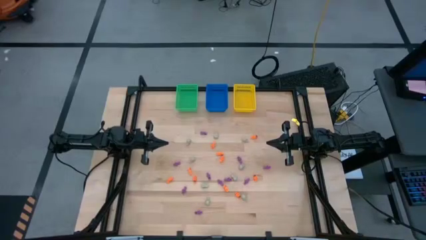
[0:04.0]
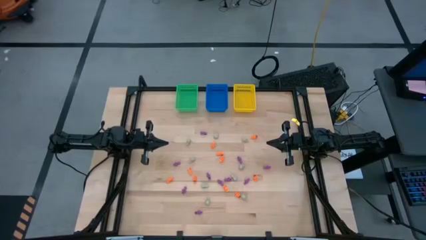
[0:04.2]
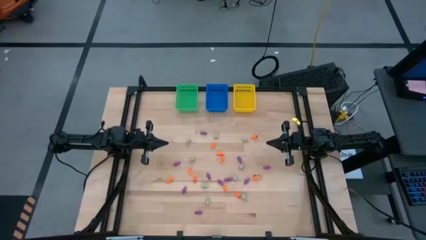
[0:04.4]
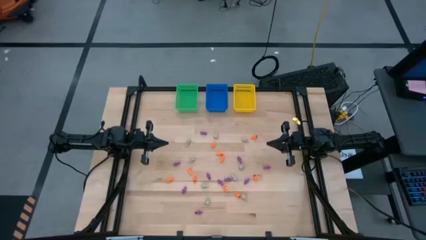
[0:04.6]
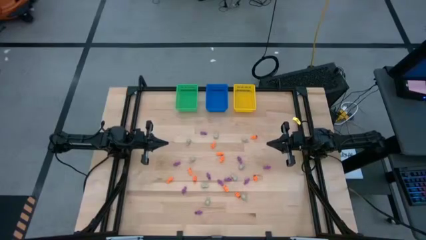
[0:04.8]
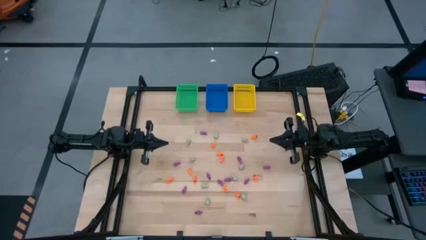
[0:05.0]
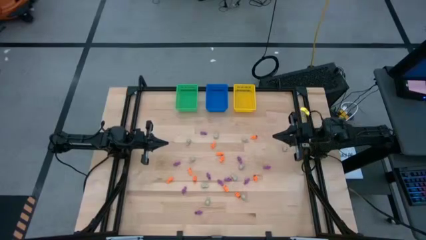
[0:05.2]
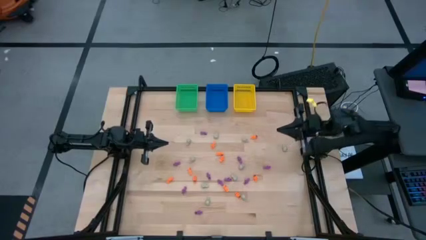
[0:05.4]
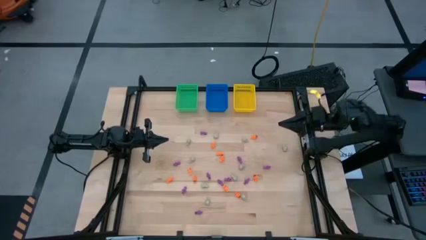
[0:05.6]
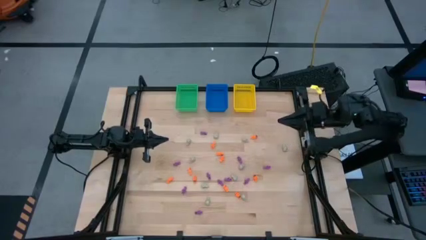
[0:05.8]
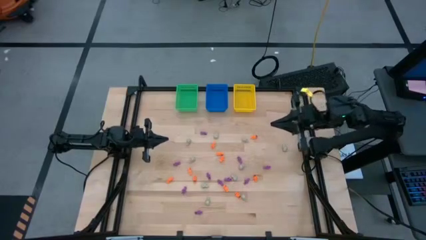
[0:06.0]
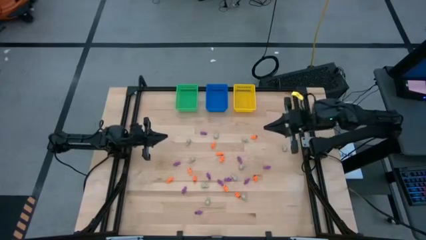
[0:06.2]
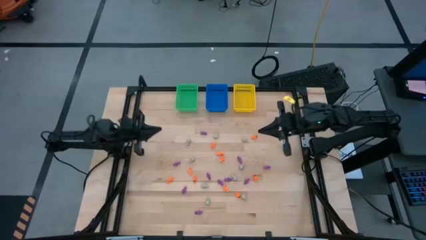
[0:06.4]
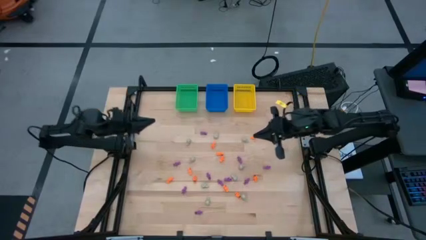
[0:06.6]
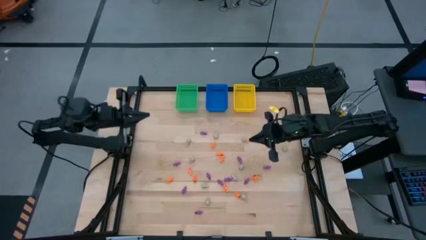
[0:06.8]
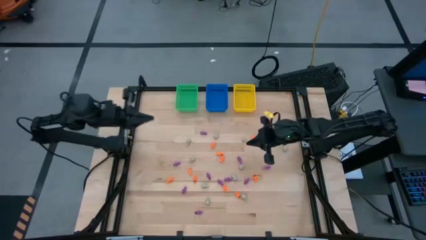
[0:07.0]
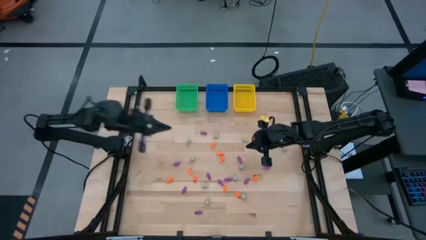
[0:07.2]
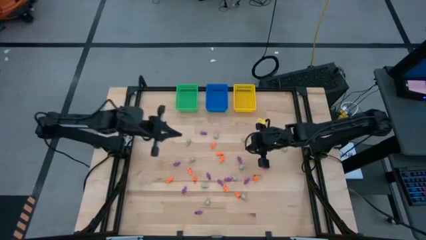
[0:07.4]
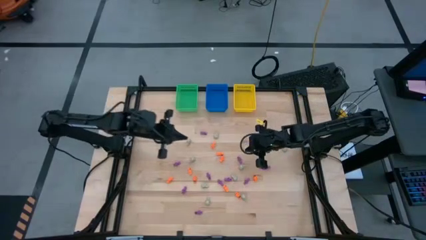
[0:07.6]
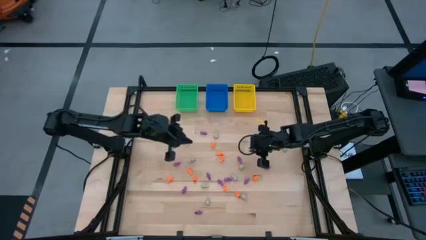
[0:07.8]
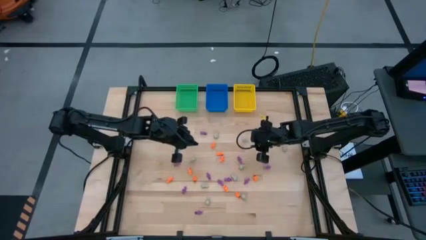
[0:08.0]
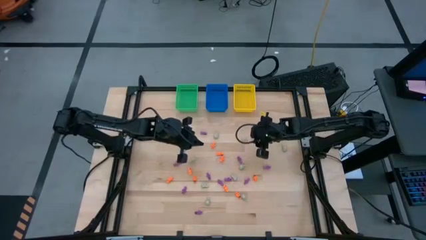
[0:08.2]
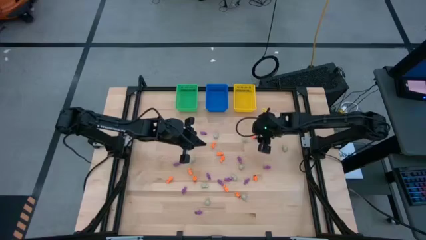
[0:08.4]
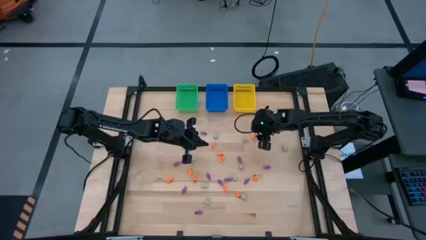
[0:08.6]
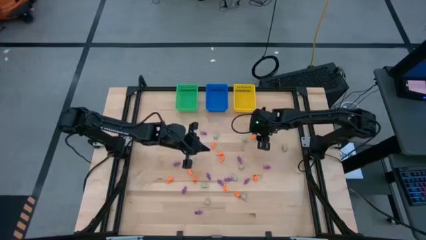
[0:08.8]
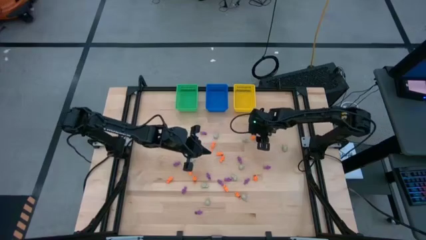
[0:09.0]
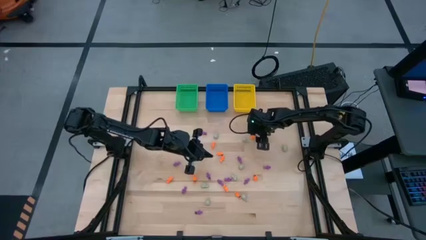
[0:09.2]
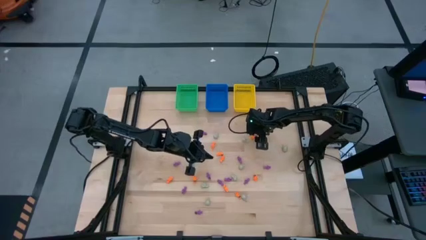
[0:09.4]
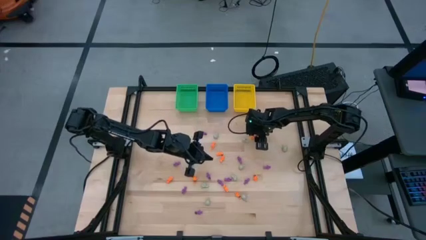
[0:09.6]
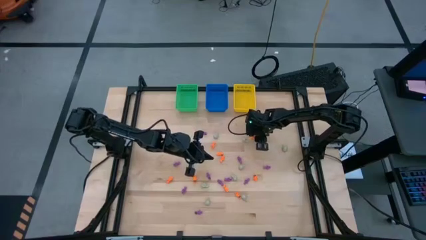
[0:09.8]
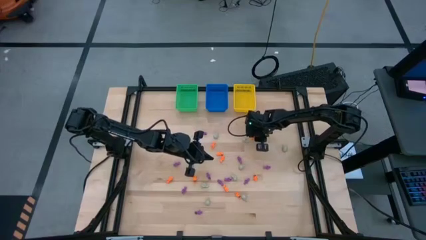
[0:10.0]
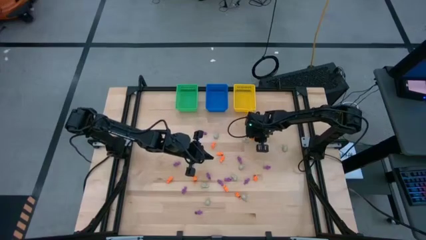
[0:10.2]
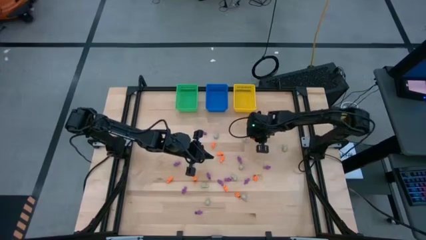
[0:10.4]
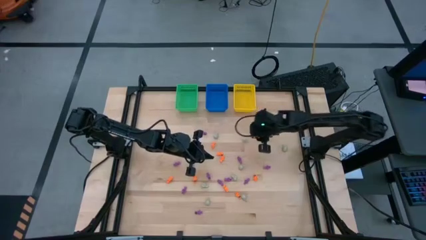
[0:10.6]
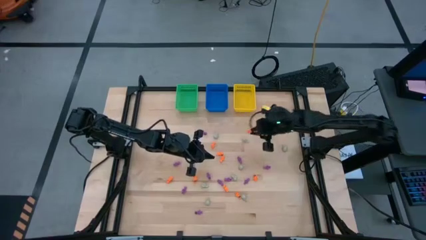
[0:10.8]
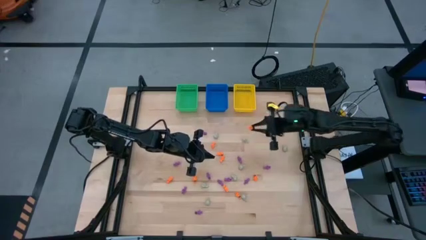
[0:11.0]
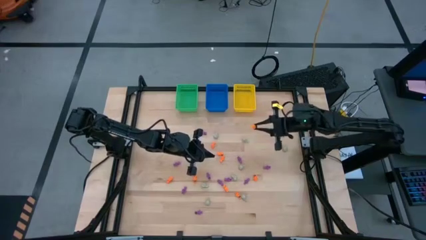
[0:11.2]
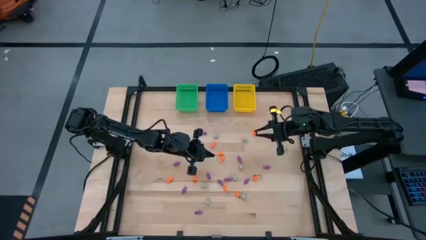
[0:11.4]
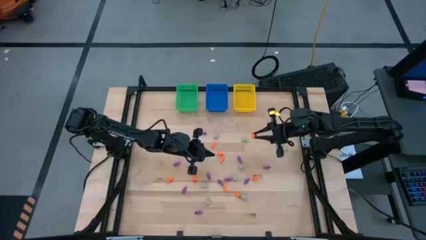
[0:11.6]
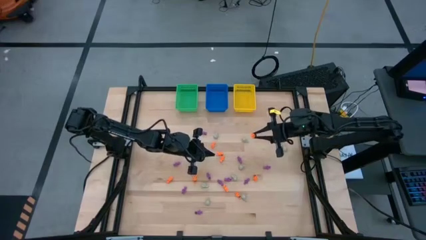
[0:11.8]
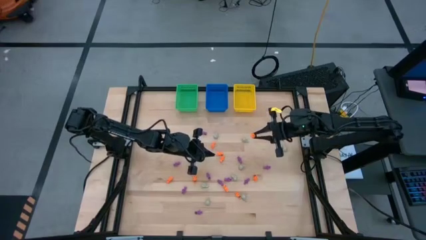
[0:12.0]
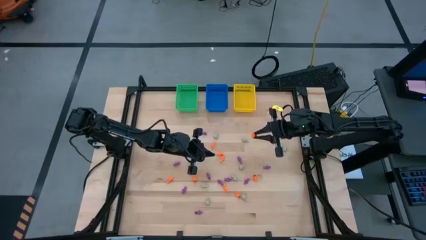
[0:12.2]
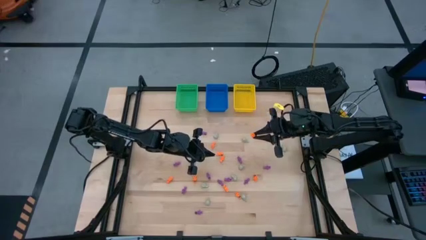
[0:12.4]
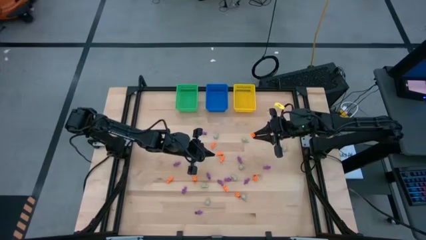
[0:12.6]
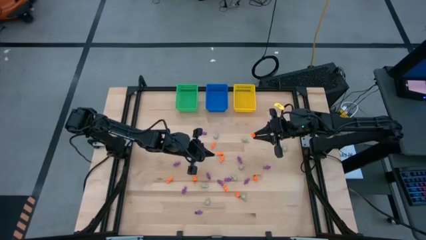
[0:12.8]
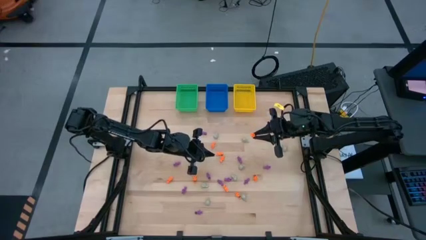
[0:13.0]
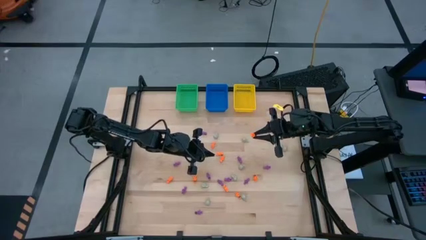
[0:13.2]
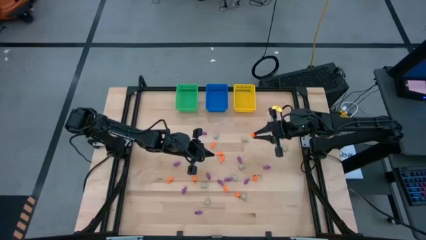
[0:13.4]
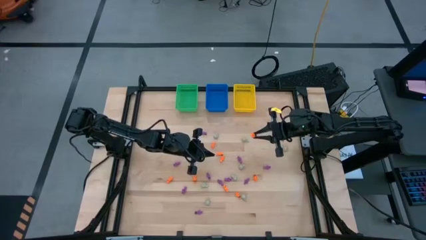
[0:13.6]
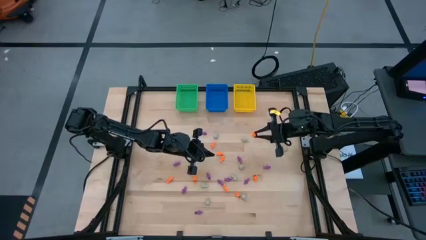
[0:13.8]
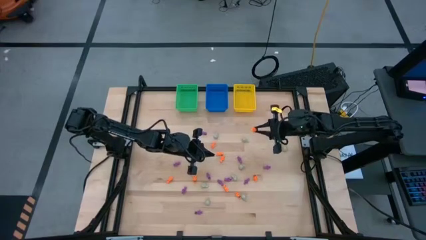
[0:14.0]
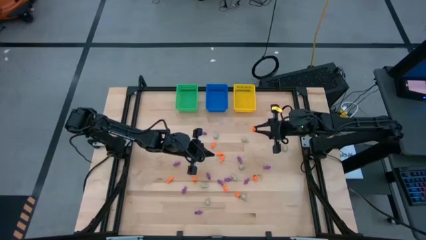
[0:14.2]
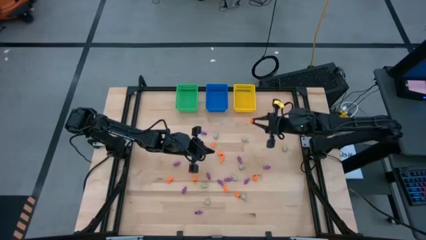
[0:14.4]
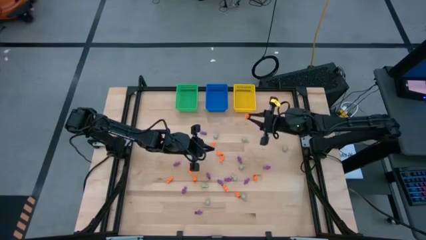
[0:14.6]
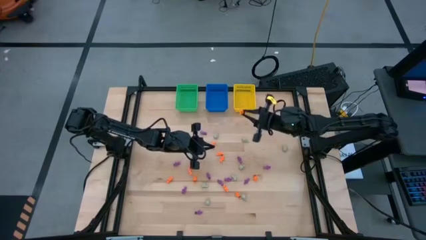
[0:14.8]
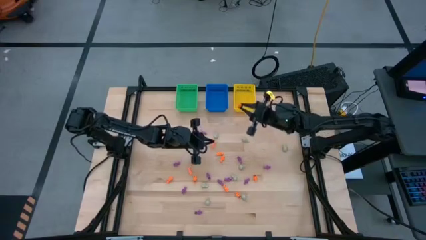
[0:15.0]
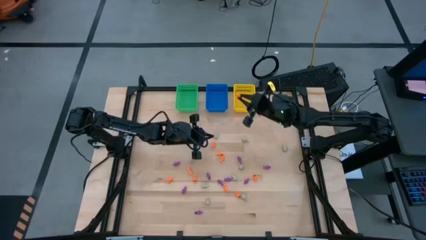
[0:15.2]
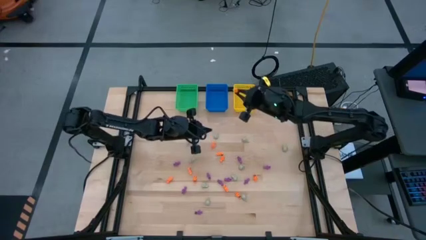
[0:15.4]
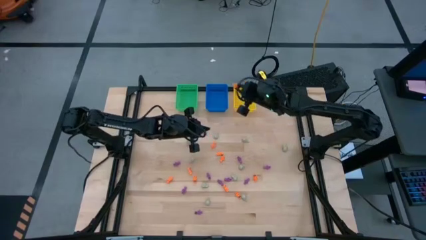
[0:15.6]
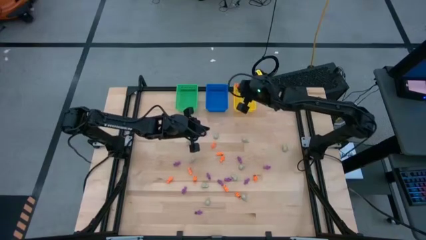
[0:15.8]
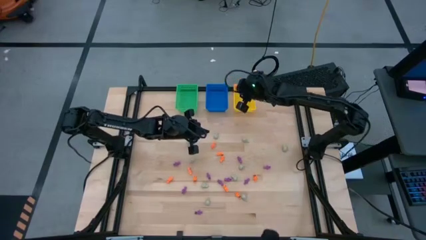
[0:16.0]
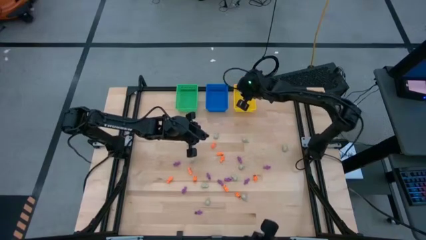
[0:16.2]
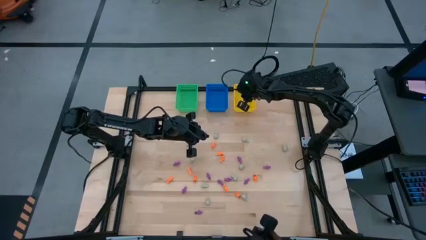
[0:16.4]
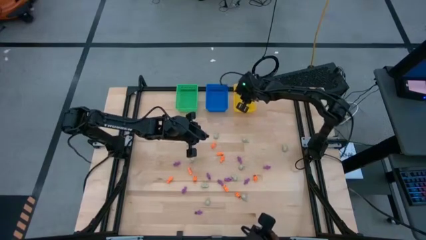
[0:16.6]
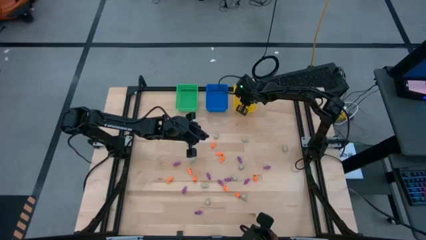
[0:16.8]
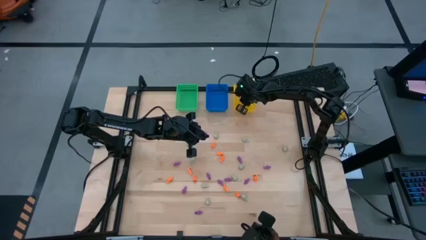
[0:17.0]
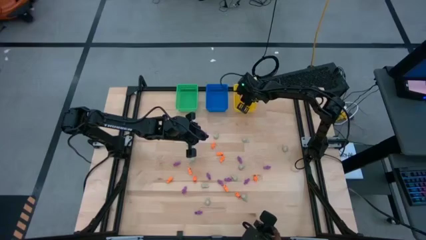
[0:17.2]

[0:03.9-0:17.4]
Task: Sort Halloween decoration
Put the orange skeleton toy into the yellow bin
